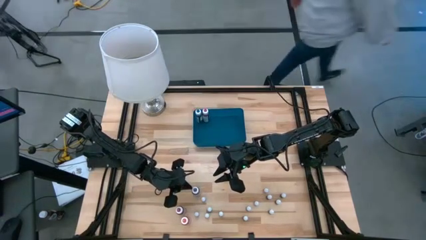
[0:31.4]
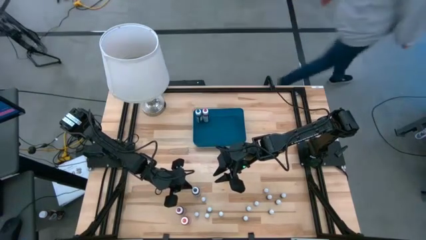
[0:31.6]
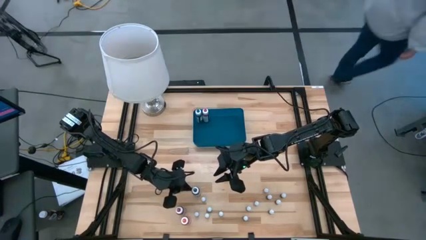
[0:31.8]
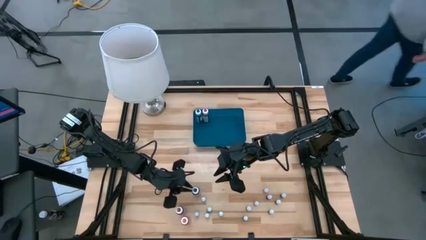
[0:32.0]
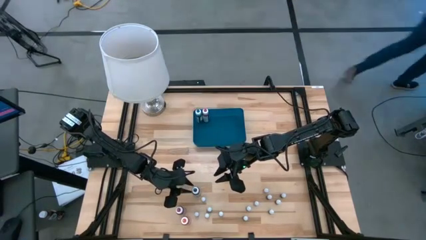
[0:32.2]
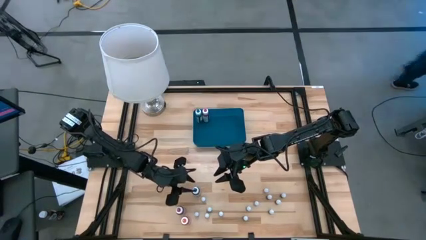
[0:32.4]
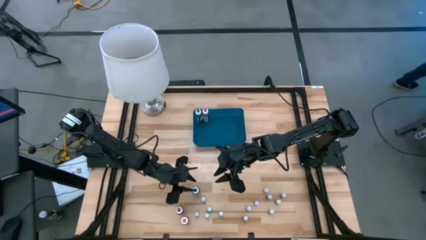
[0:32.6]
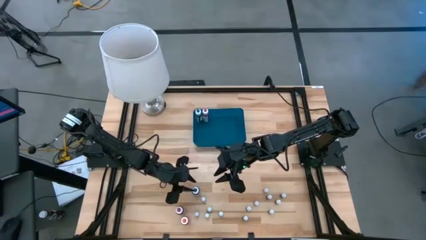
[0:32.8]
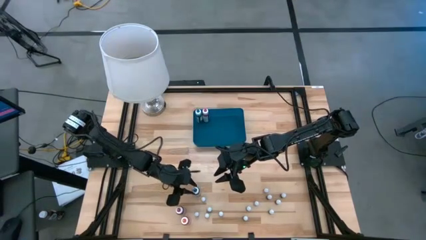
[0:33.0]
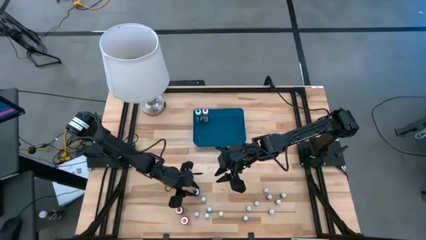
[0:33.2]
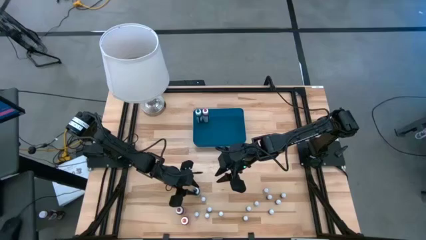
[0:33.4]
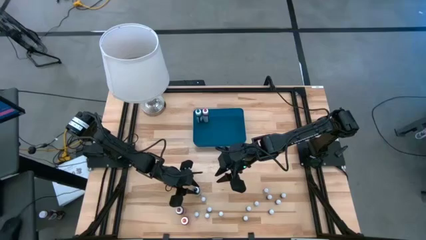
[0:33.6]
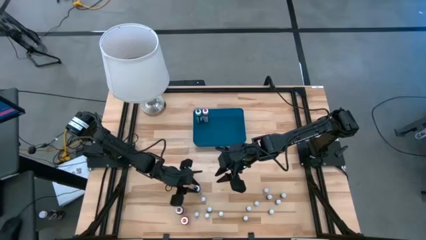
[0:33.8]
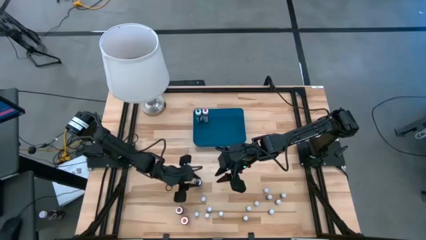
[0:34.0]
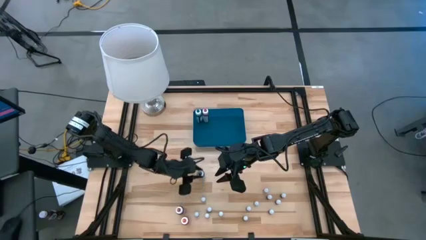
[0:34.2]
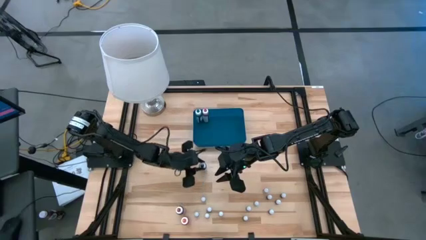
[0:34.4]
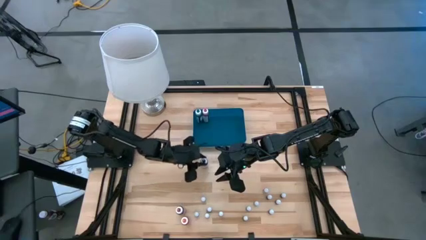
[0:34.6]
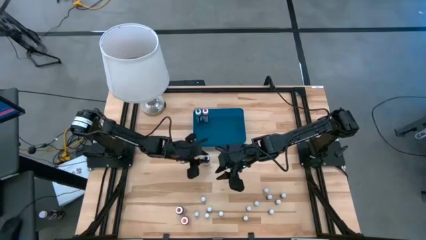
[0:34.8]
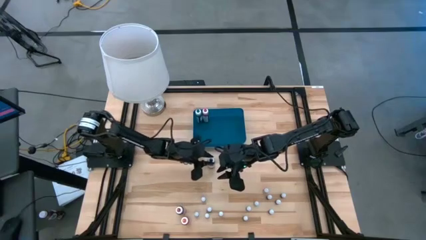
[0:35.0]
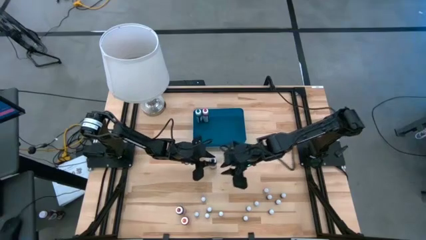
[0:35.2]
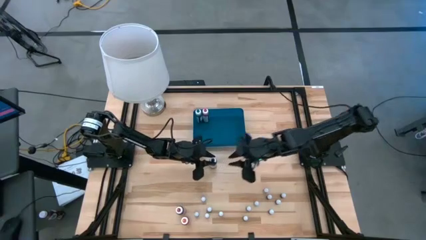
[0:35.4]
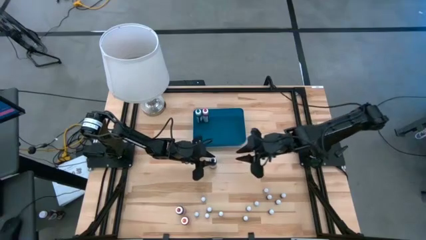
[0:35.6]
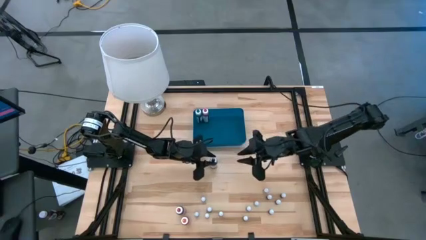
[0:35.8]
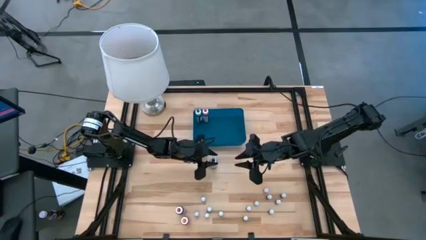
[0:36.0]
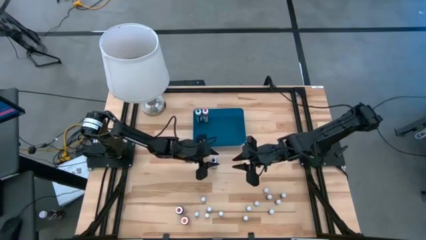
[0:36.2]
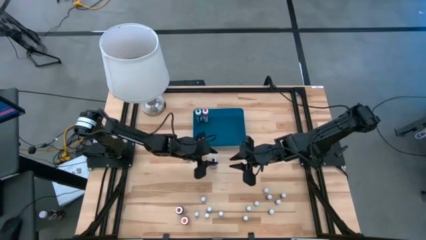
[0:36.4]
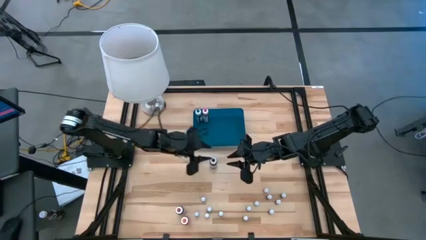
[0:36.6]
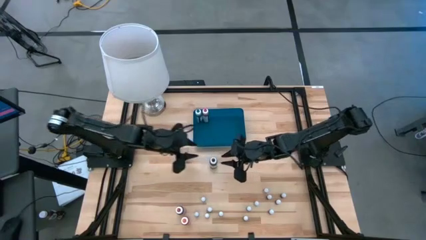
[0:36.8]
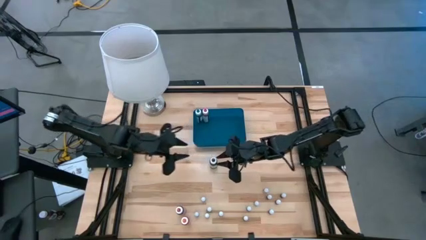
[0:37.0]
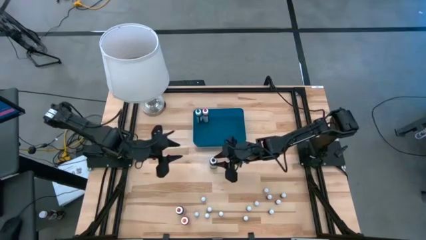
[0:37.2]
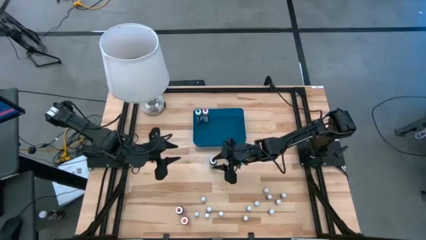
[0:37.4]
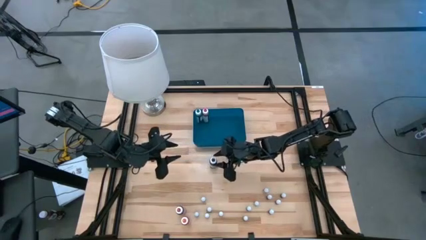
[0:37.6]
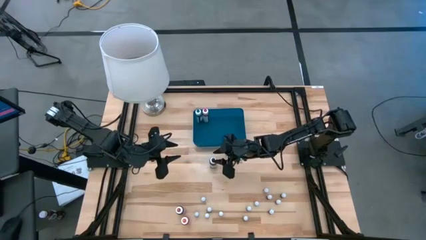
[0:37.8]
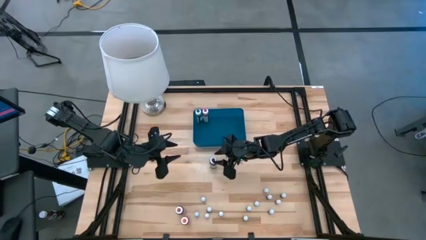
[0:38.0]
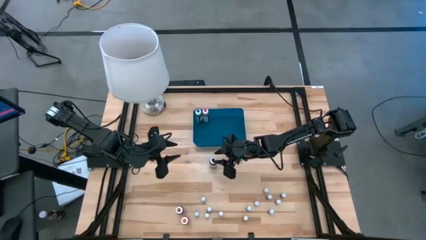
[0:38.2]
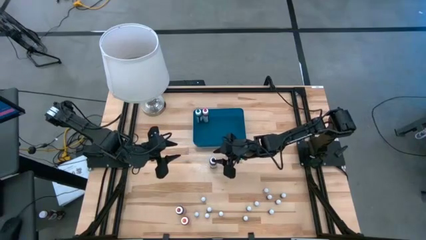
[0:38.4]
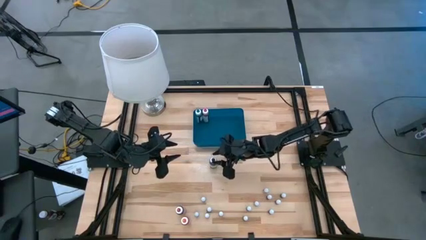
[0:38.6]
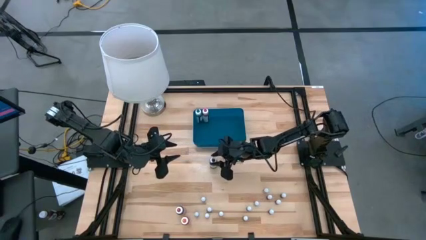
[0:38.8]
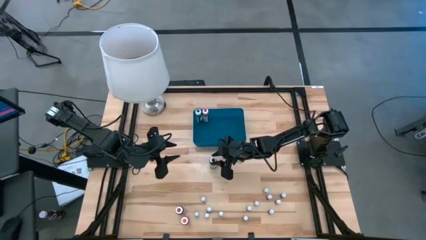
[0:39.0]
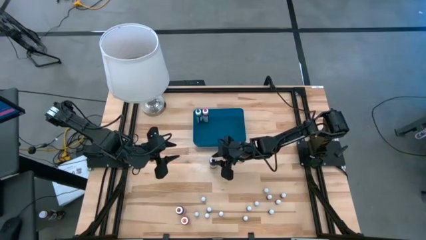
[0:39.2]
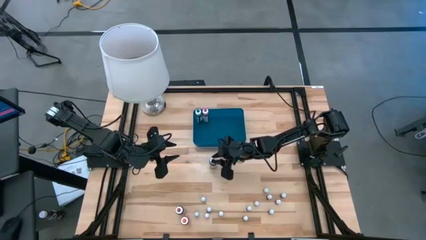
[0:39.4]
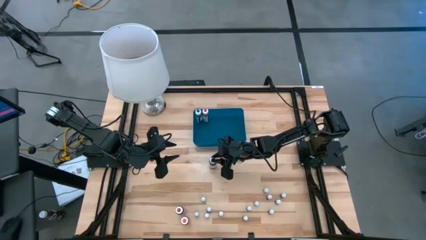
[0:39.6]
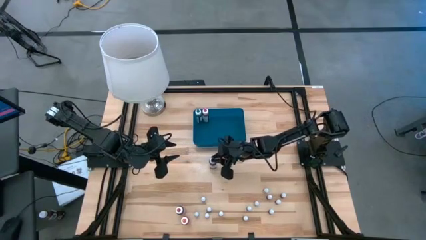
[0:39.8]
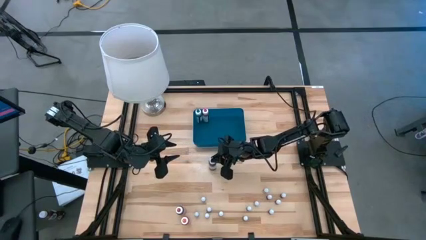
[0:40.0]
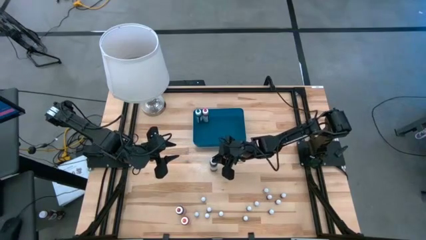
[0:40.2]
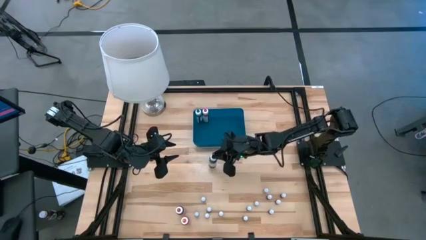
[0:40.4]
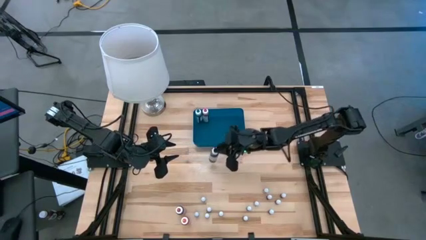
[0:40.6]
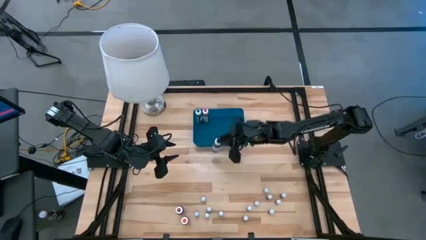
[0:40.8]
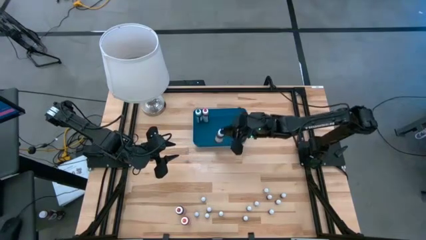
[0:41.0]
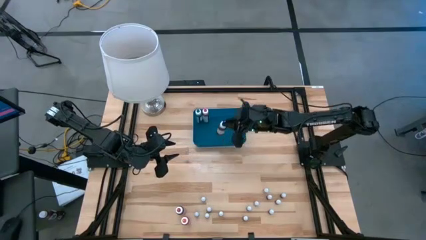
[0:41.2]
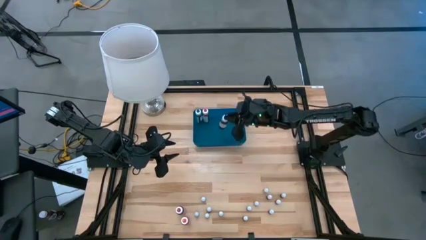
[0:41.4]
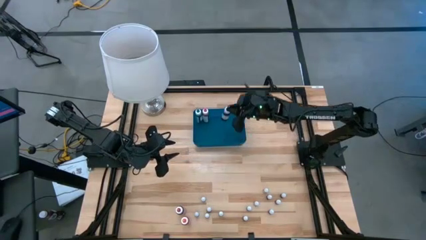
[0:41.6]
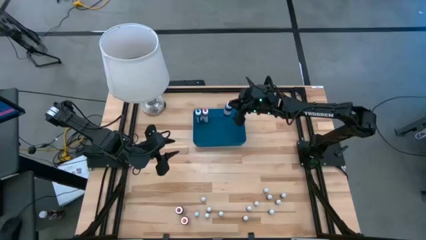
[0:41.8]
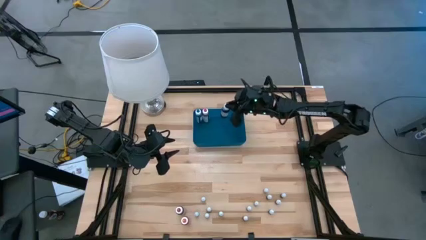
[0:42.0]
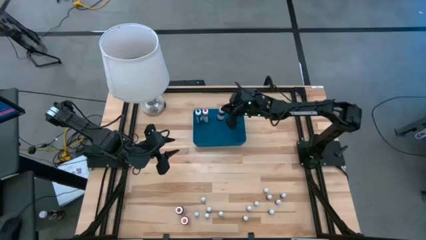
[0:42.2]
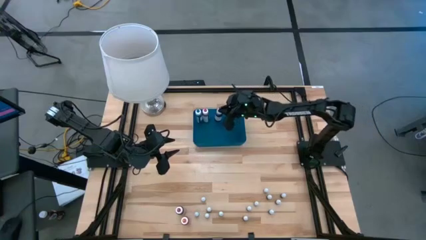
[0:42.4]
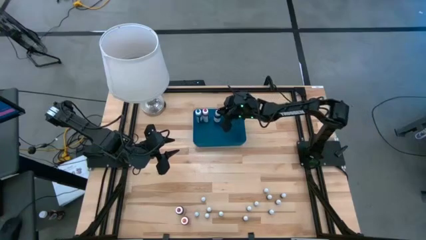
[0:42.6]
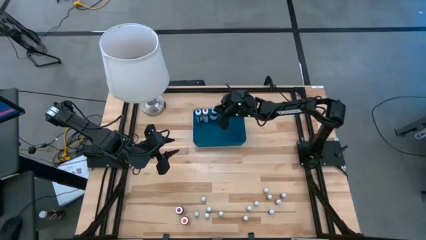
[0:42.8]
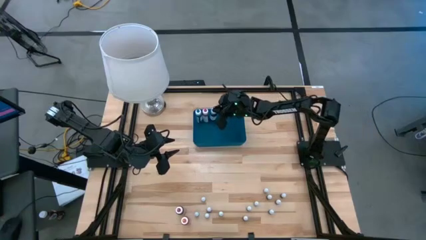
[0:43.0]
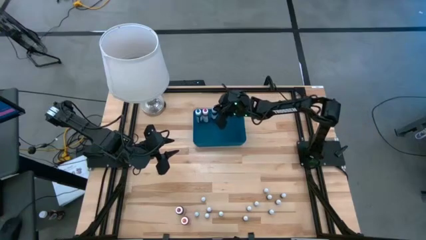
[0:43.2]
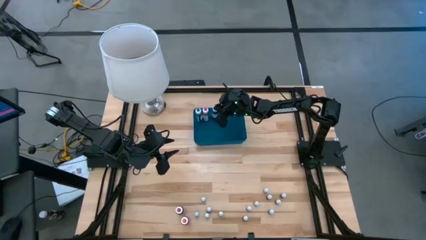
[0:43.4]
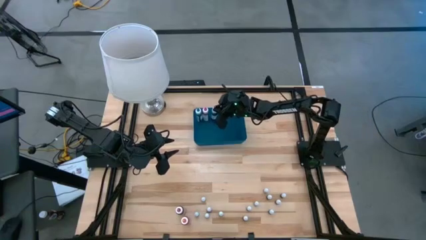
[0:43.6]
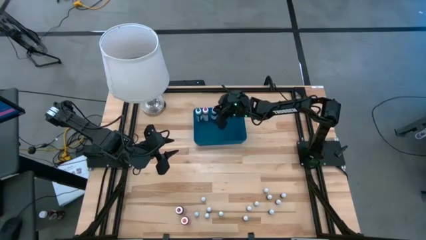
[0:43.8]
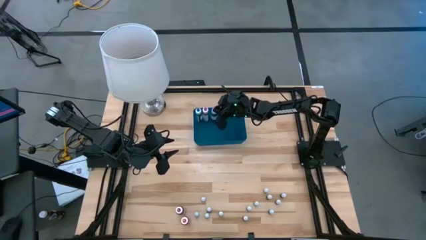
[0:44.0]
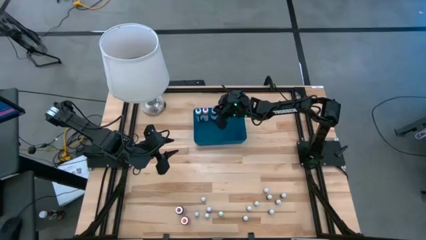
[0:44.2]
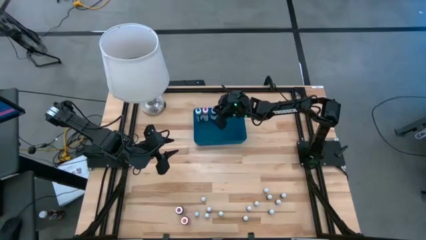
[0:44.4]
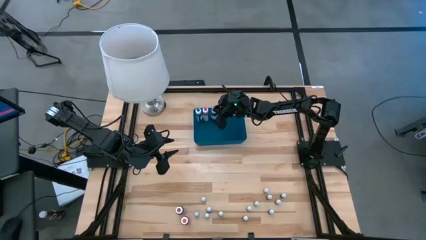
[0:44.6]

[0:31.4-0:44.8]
Task: Pick & Place food coloring
Put the large black food coloring bottle into the bin
